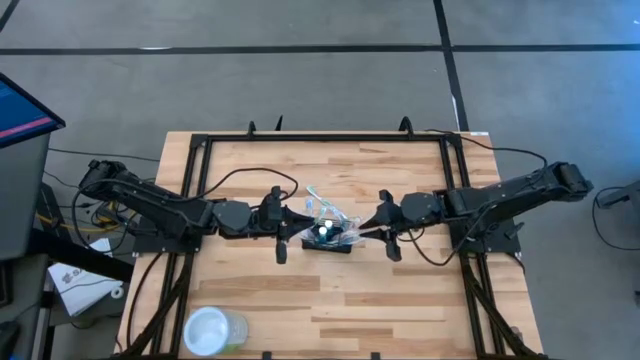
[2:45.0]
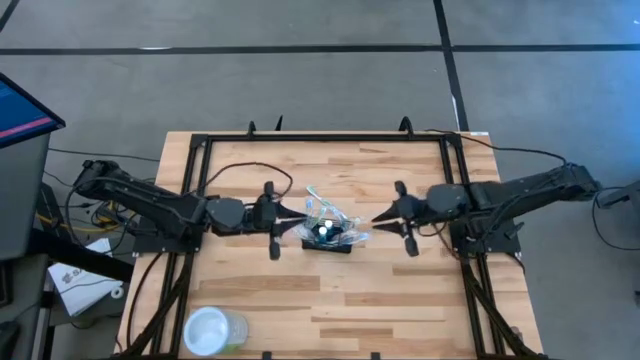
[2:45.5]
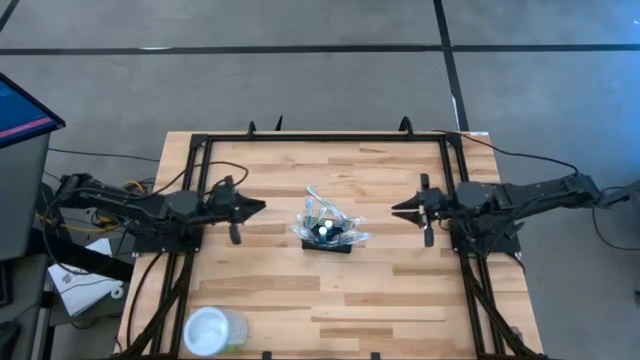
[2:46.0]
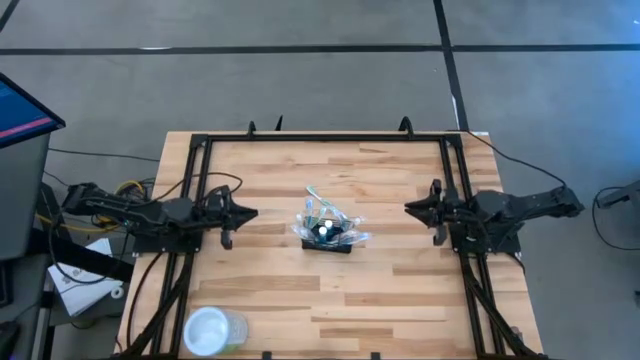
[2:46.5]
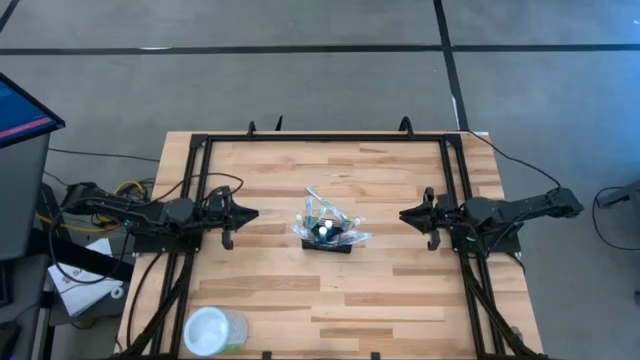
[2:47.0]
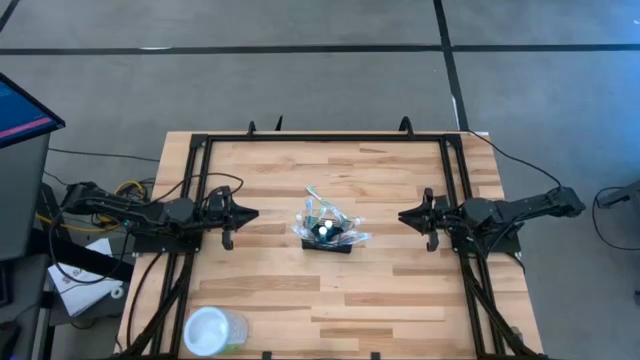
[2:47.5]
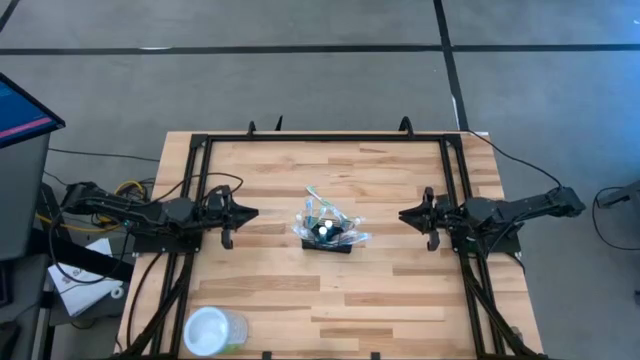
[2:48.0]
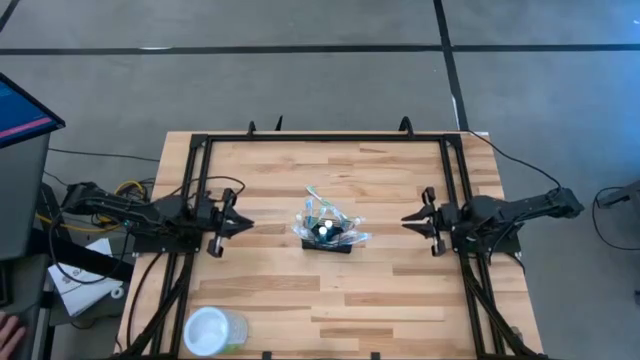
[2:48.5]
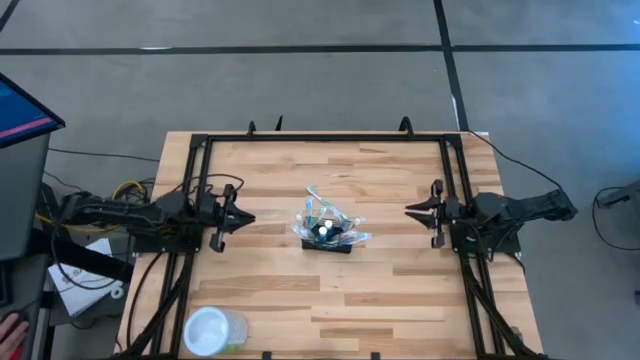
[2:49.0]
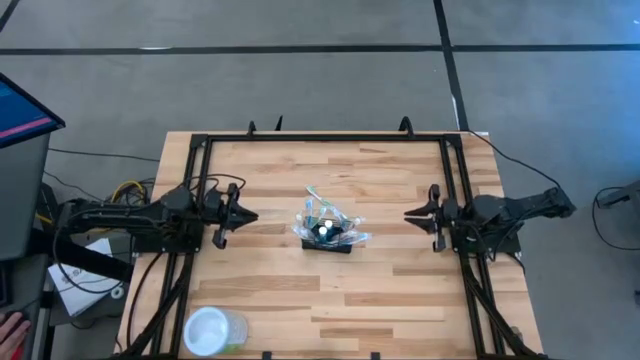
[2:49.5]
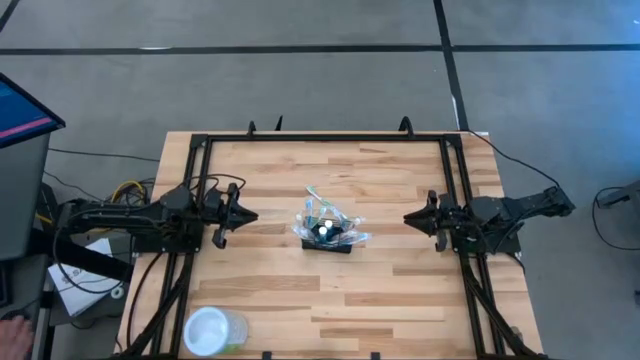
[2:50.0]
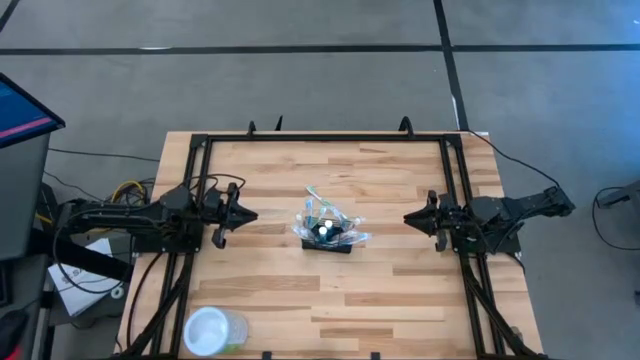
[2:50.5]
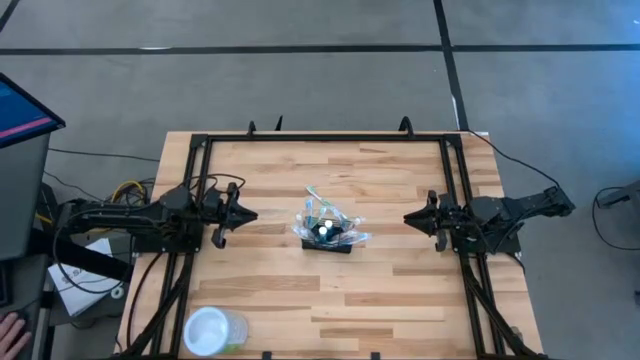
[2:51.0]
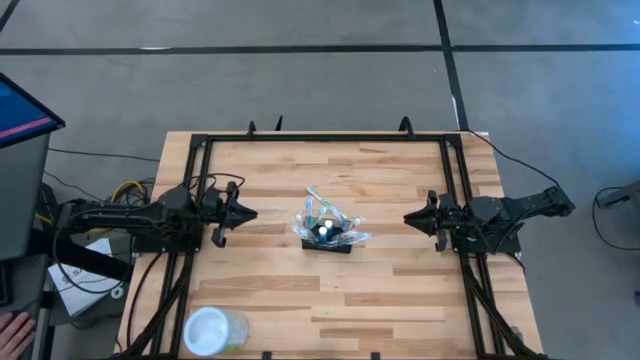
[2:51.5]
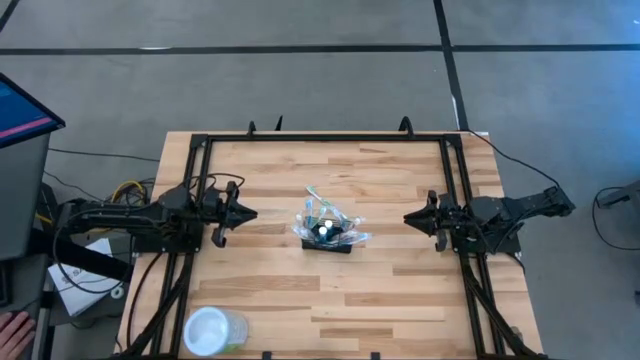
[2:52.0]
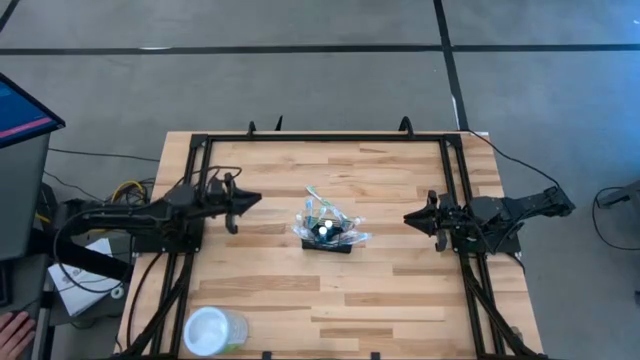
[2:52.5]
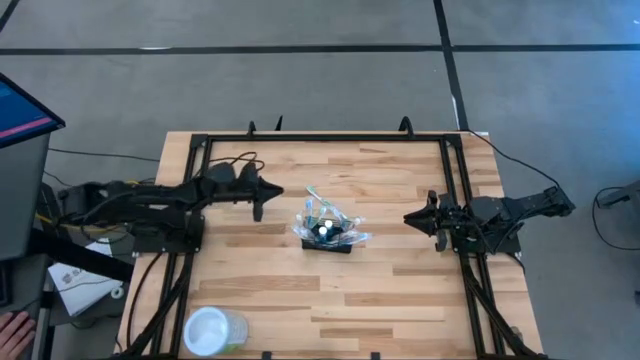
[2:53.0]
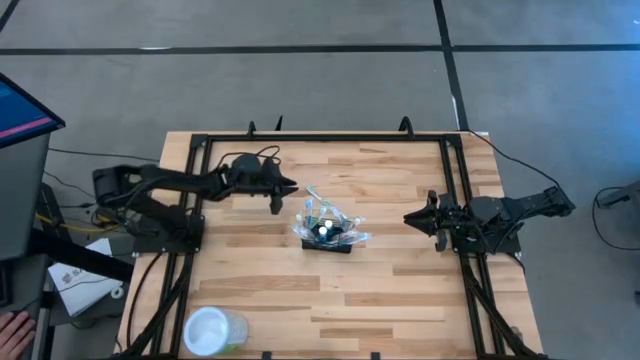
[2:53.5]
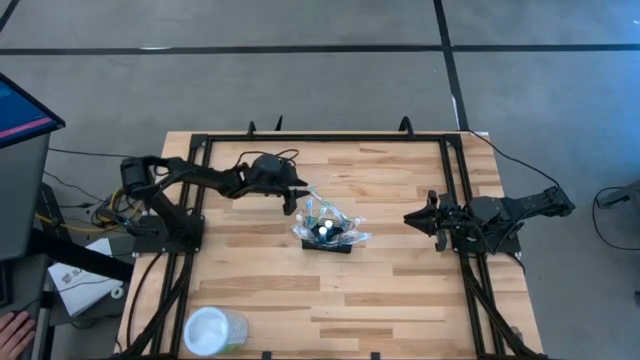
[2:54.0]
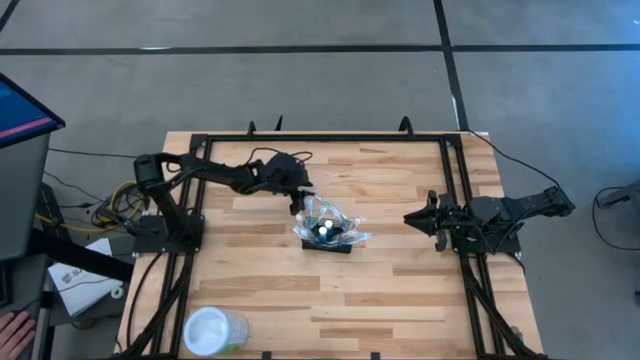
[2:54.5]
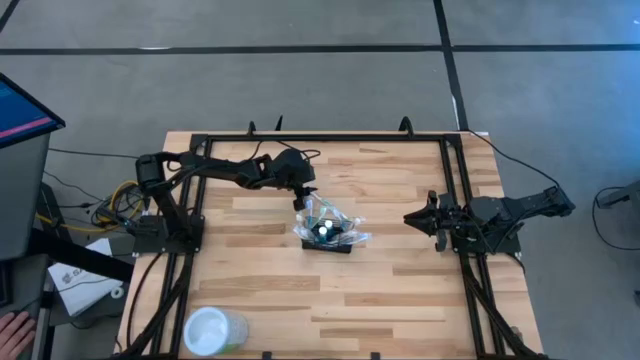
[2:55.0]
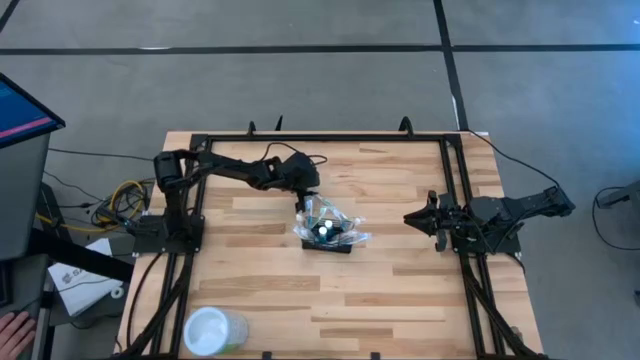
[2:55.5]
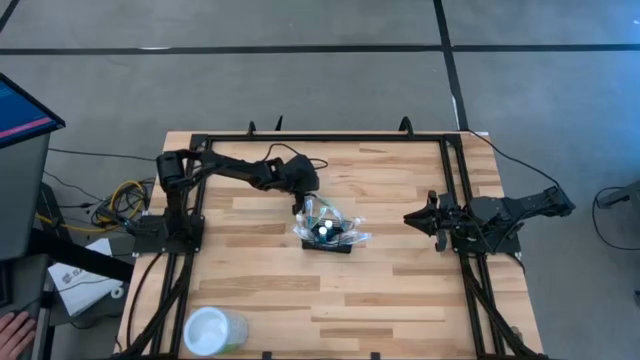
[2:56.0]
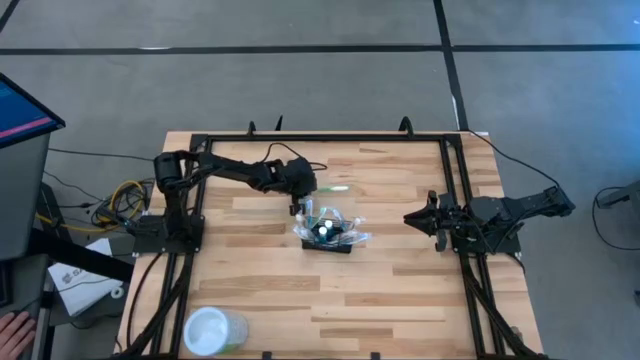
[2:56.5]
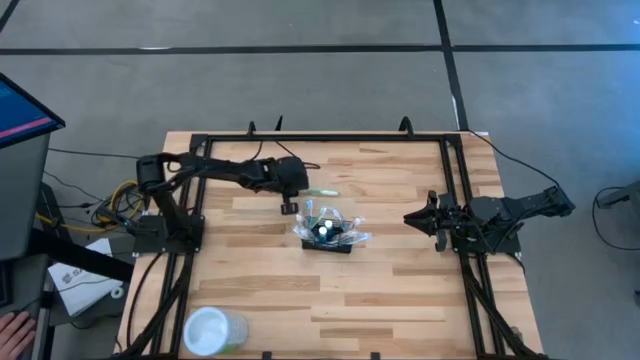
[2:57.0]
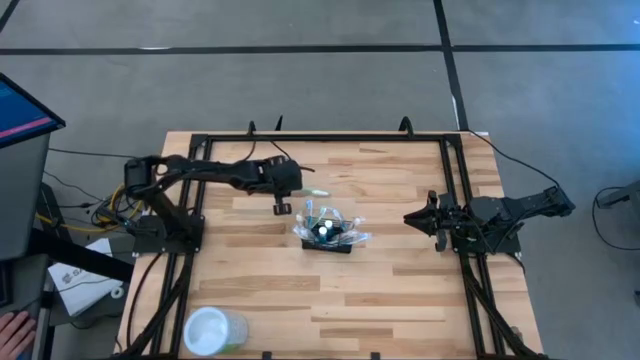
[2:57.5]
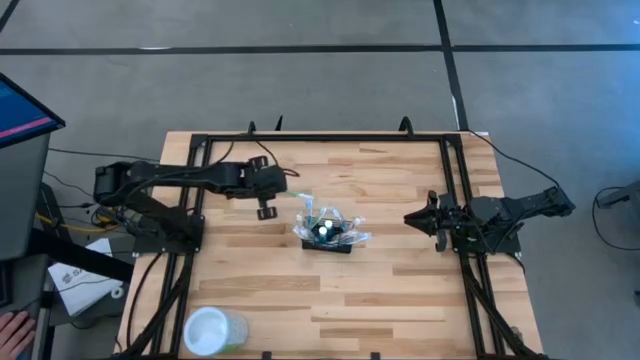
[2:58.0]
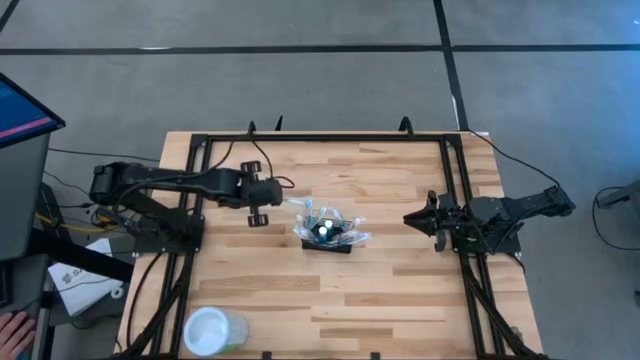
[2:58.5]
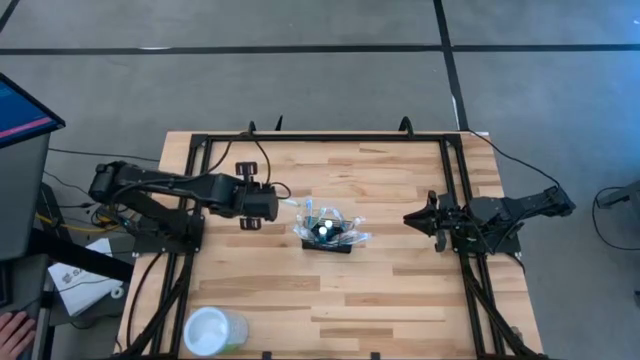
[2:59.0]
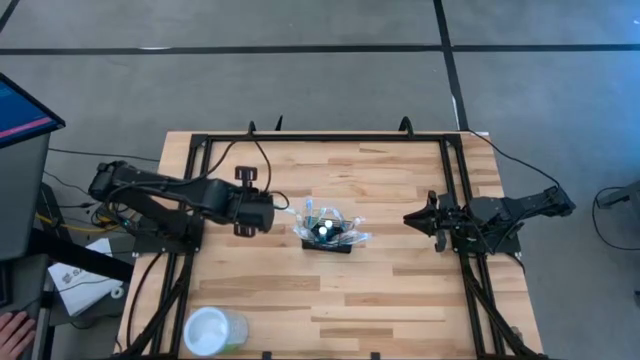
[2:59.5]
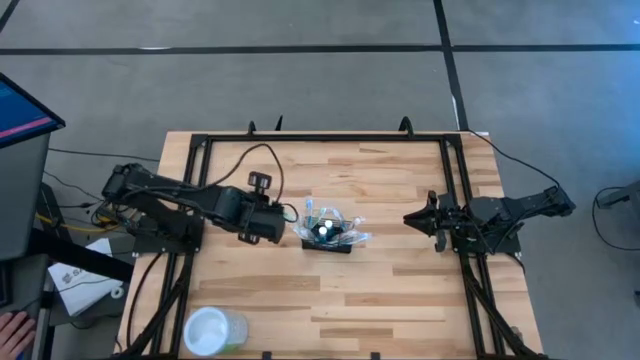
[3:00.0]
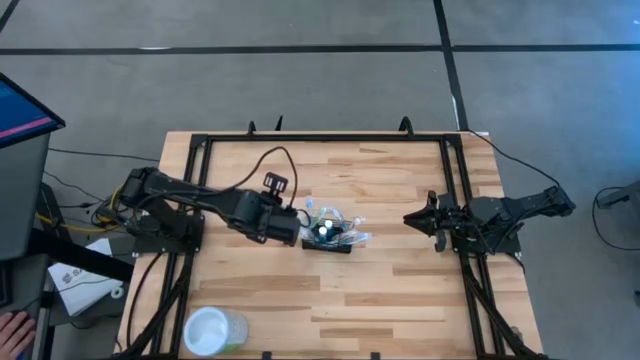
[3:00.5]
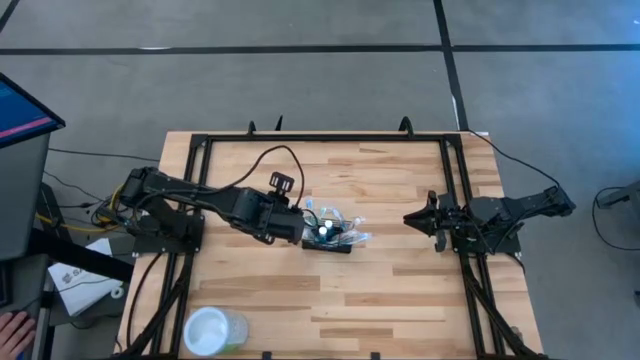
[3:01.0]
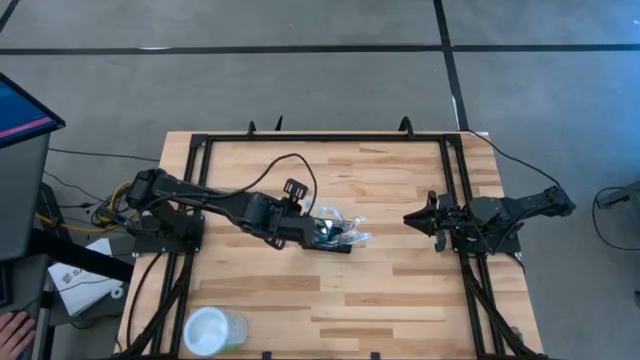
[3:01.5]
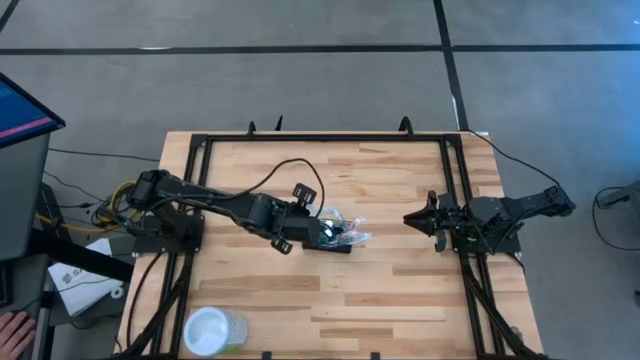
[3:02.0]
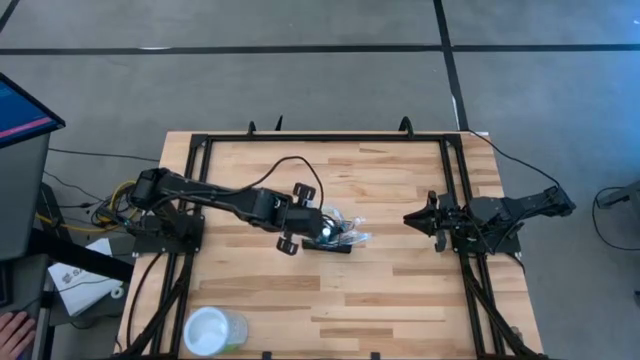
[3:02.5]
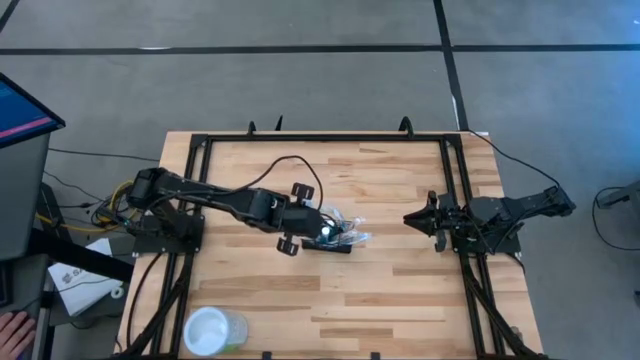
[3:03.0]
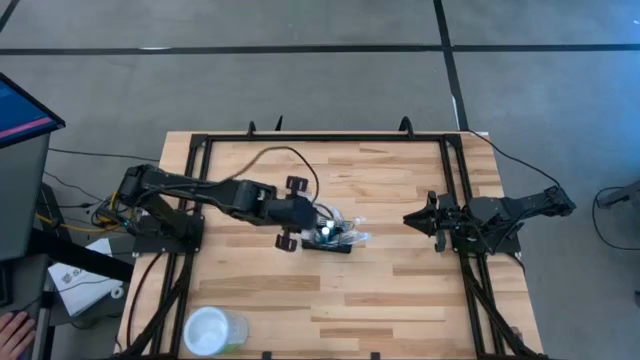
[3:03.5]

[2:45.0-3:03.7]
Task: Pick & Place toothbrushing station
Put the green toothbrush into the wire organizer
